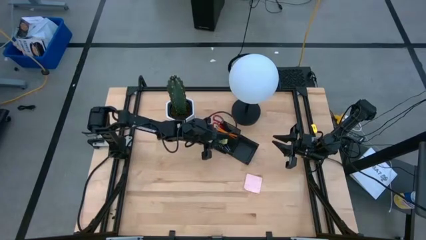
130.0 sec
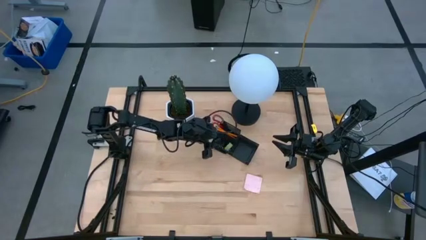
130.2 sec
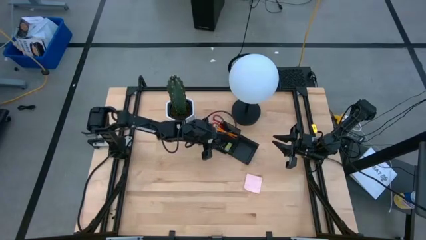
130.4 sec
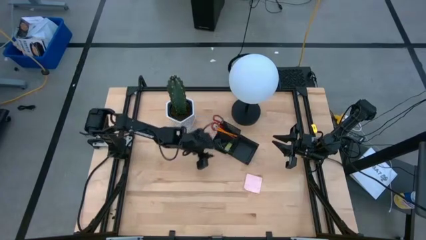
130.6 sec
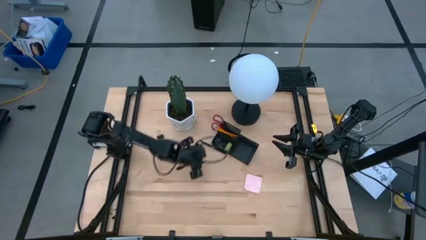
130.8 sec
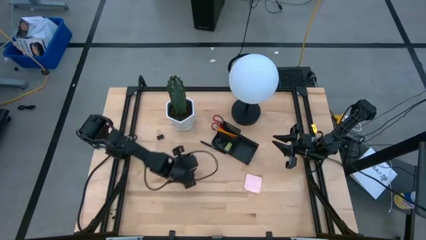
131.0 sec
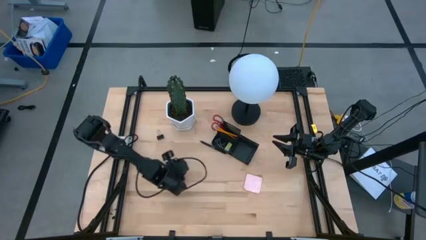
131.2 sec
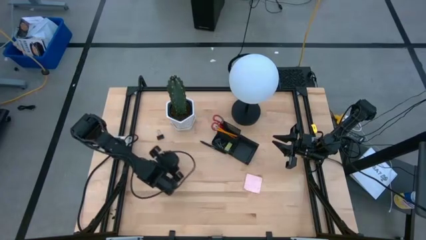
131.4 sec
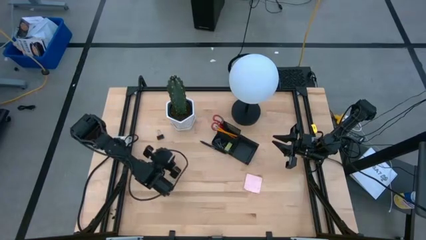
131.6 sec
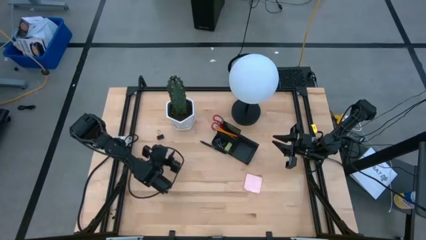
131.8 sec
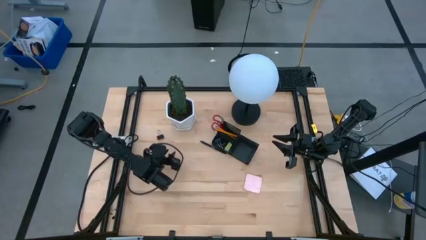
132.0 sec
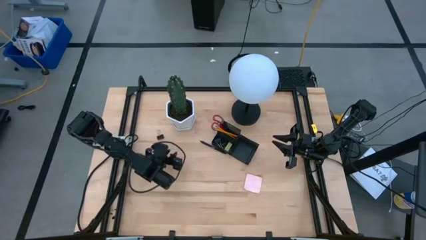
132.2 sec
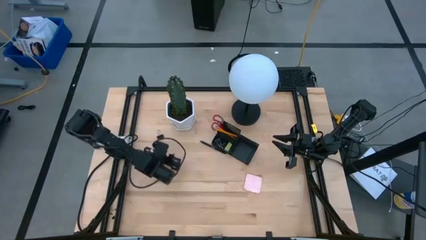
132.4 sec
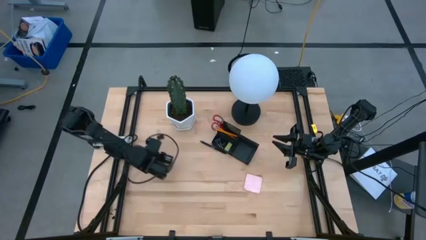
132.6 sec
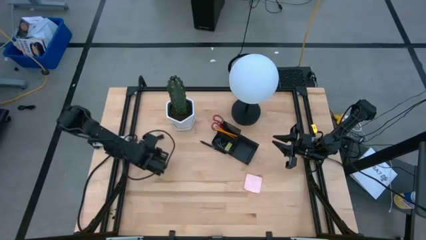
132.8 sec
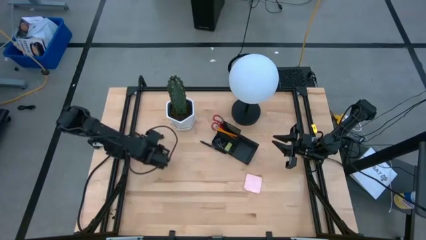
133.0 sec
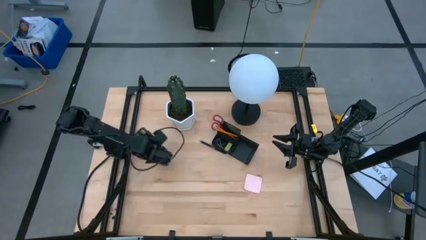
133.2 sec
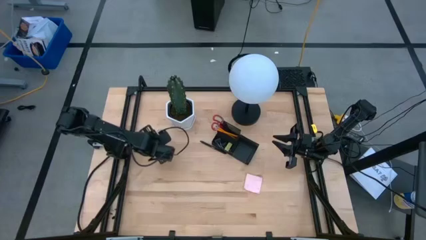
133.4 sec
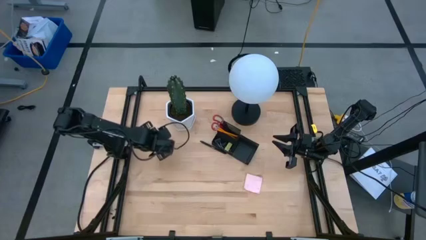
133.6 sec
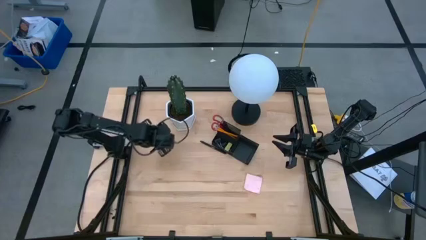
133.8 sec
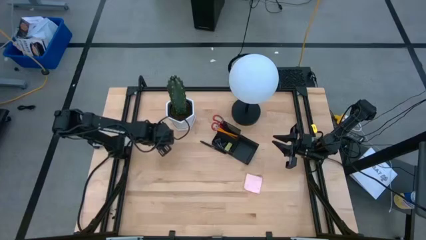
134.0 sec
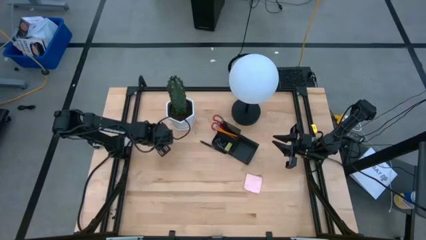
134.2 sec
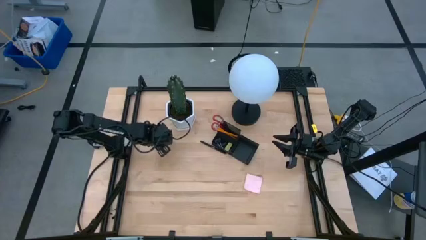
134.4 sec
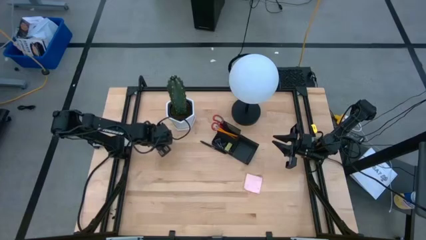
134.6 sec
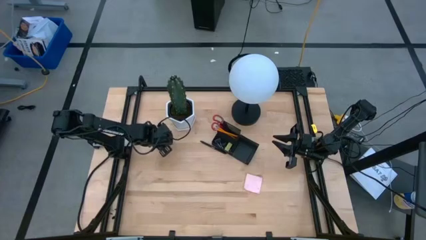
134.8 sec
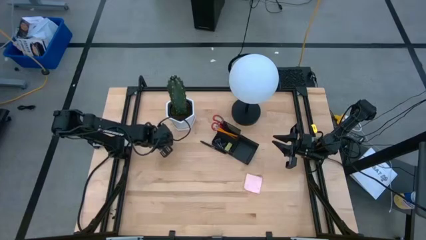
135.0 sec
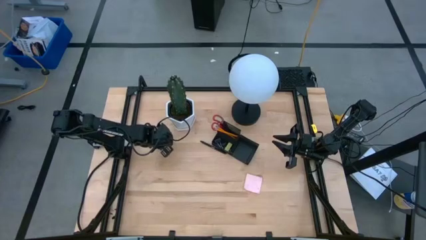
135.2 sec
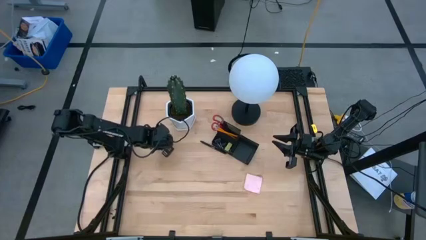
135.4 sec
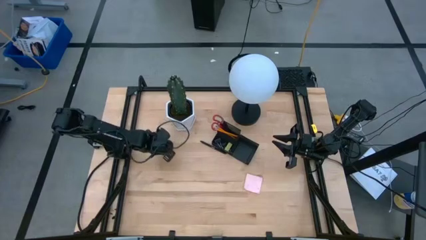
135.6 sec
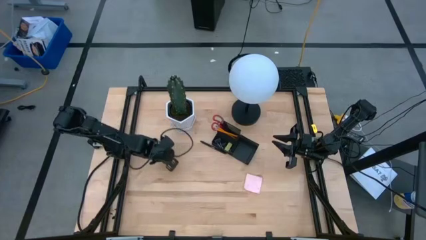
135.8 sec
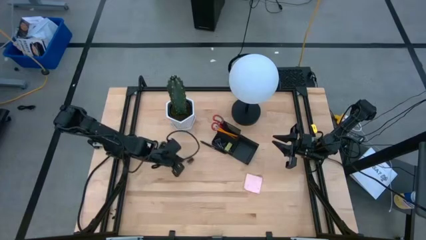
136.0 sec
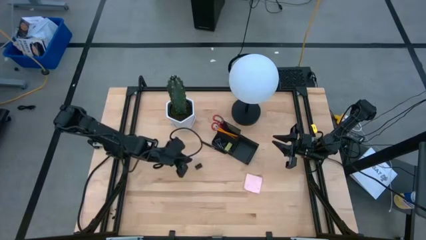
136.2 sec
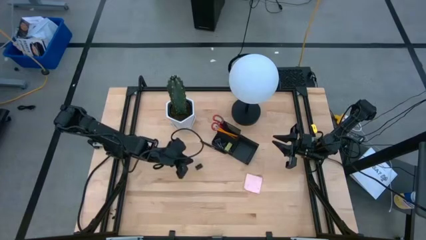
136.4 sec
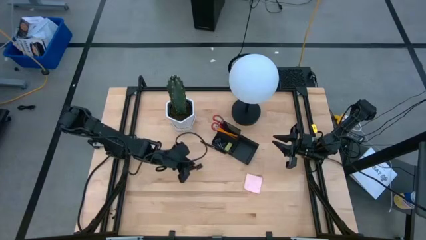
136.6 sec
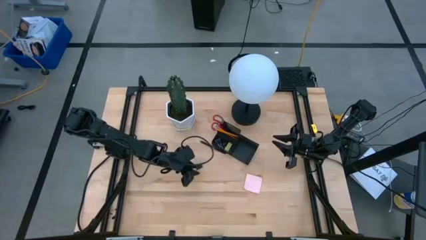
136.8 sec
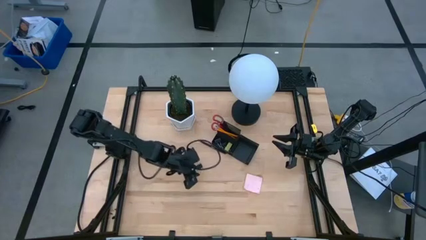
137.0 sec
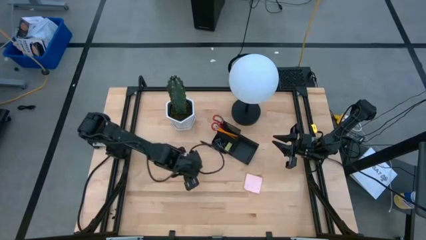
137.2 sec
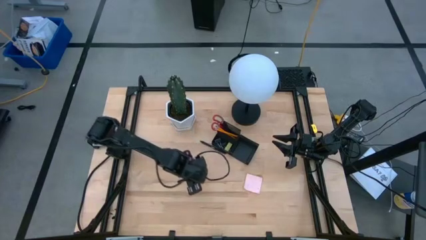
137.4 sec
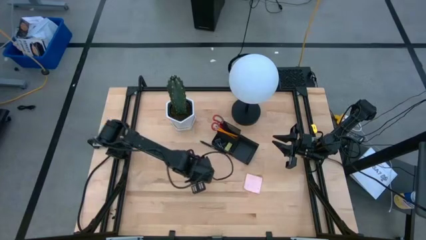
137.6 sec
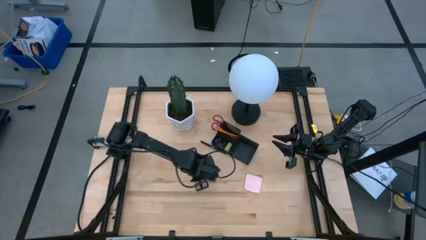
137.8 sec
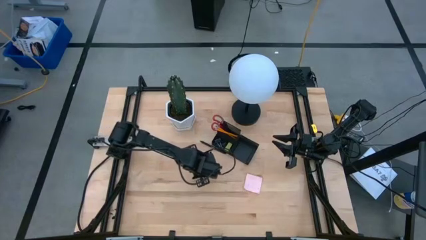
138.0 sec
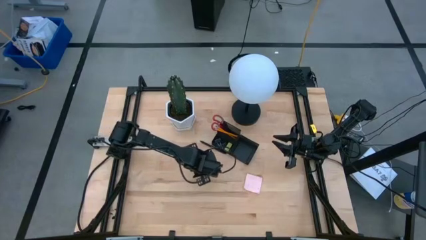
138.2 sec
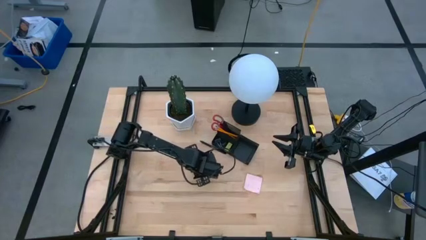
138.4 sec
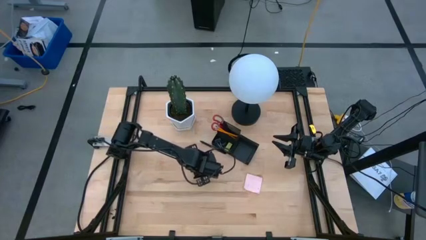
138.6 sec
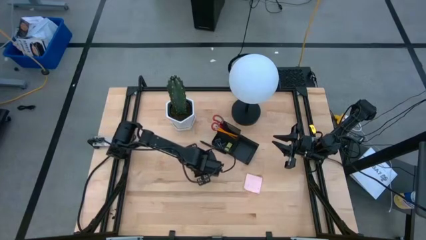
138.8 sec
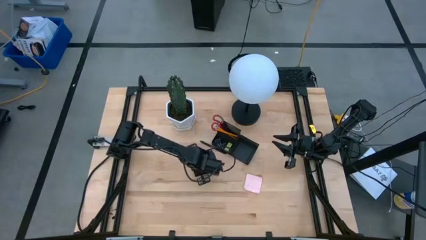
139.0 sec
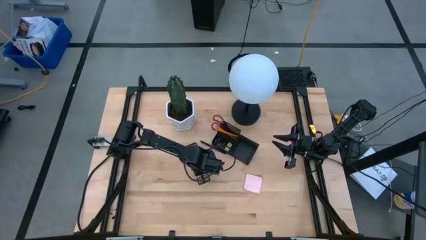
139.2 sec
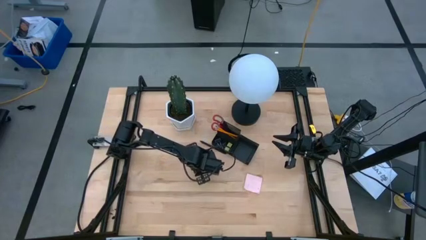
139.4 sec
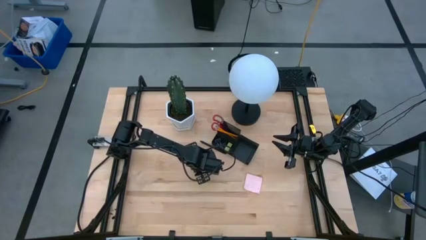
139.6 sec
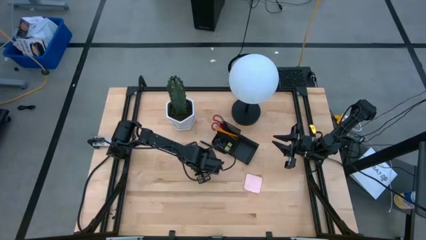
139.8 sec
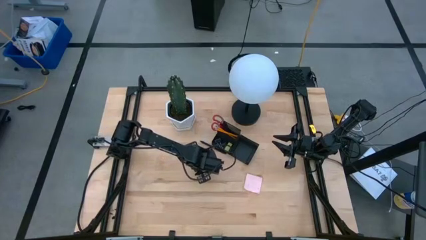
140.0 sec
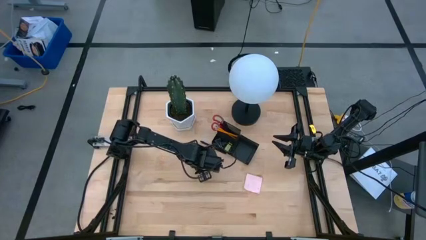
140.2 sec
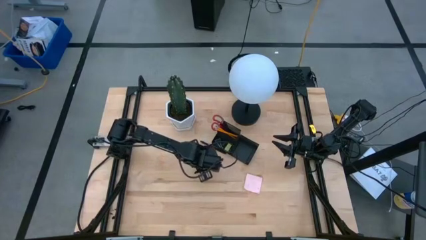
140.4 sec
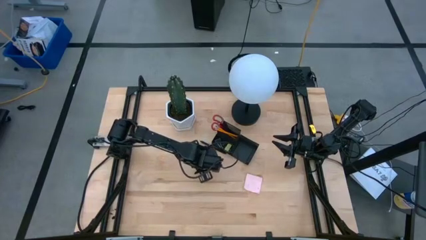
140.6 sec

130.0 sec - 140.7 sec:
Task: Pick and place office supplies into organizer
Put the black binder clip into the black desk organizer

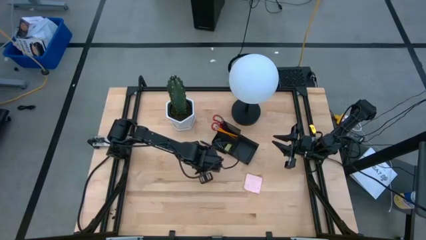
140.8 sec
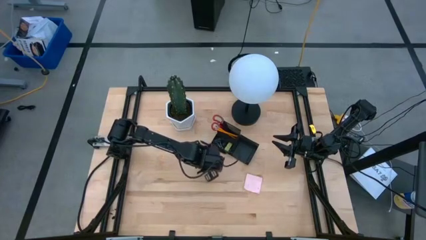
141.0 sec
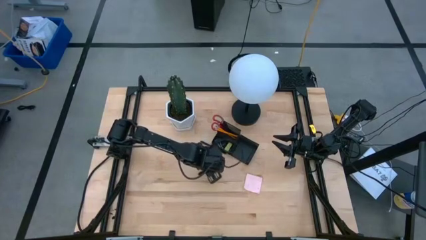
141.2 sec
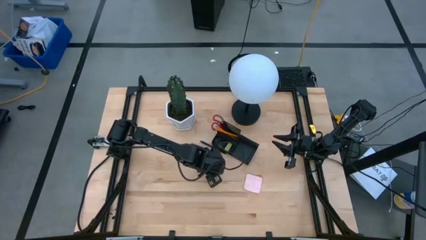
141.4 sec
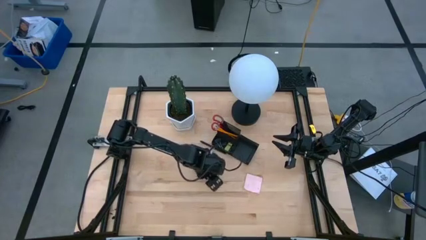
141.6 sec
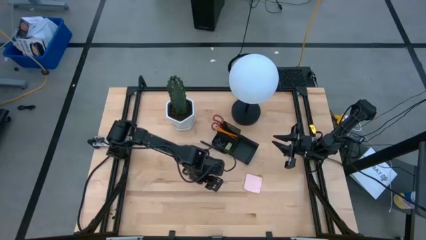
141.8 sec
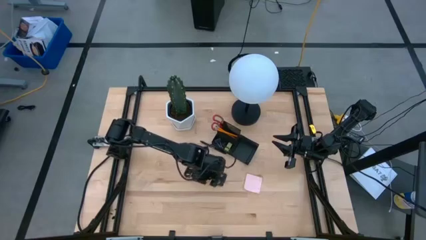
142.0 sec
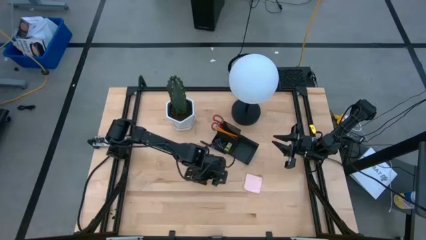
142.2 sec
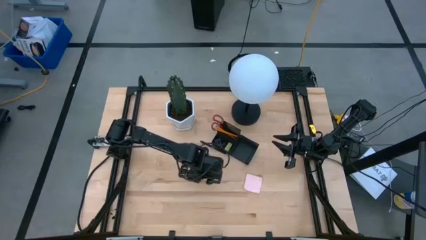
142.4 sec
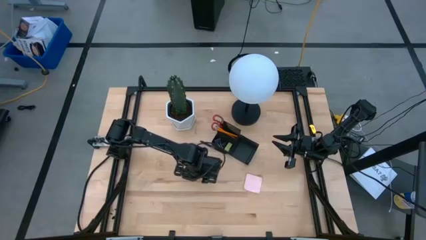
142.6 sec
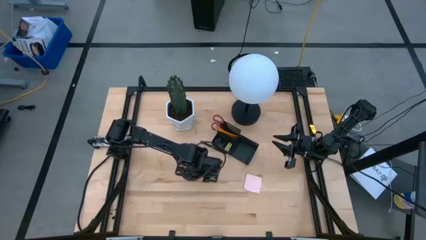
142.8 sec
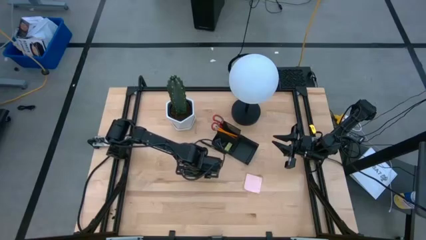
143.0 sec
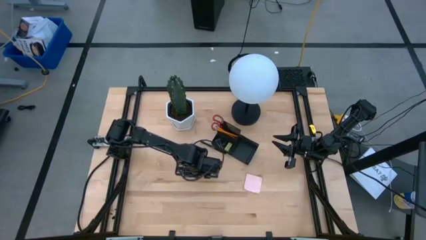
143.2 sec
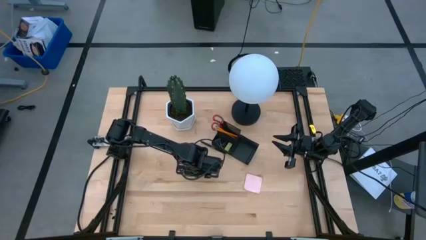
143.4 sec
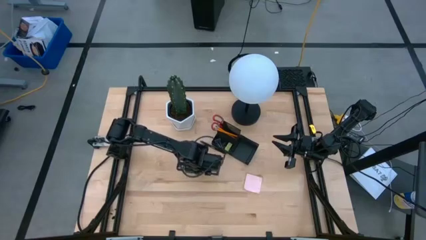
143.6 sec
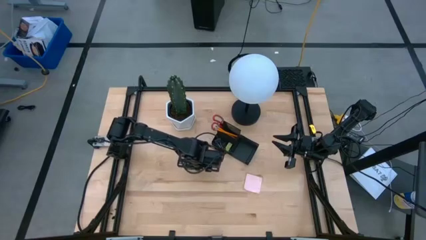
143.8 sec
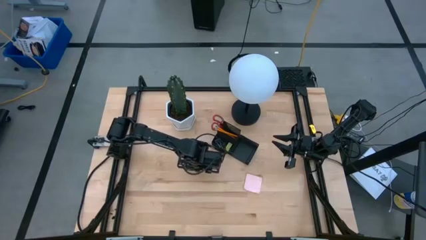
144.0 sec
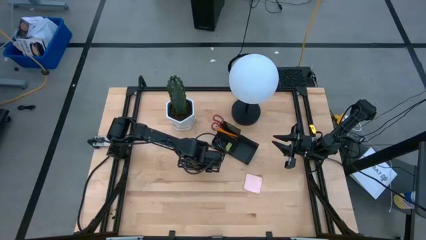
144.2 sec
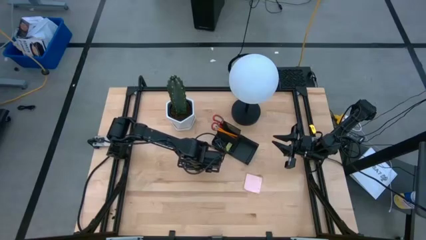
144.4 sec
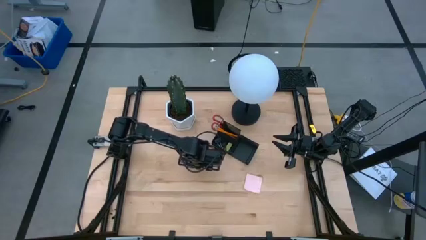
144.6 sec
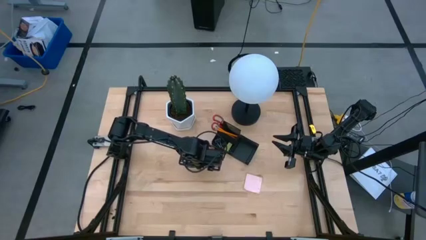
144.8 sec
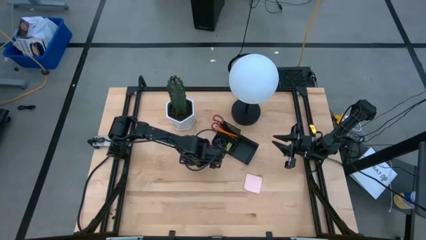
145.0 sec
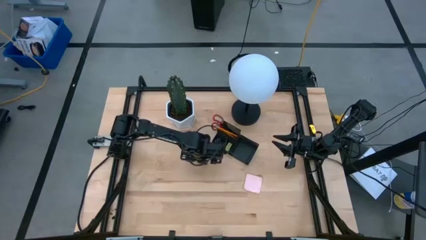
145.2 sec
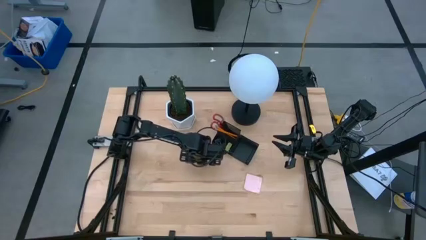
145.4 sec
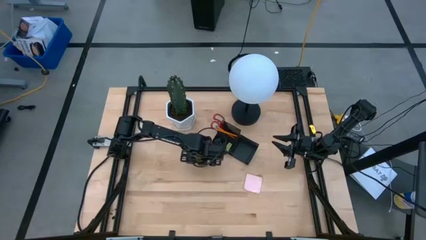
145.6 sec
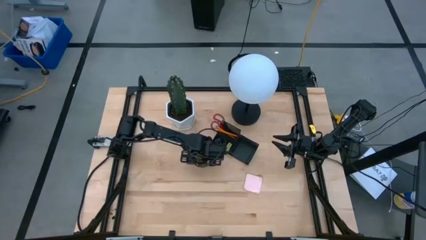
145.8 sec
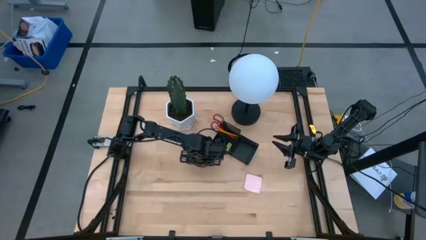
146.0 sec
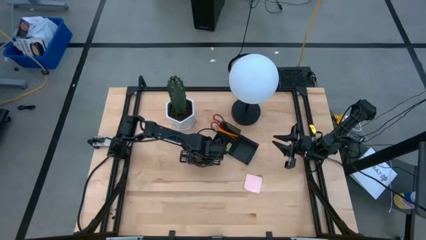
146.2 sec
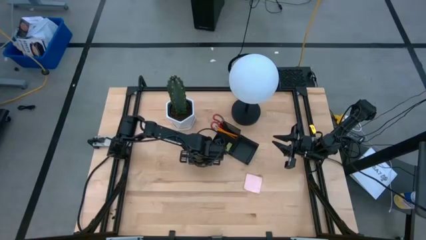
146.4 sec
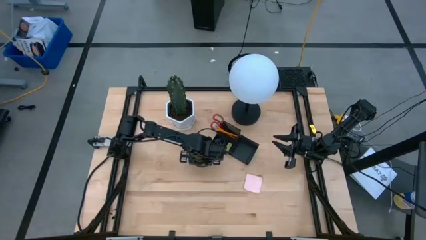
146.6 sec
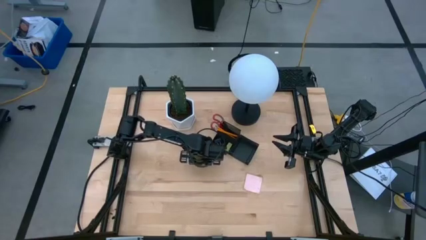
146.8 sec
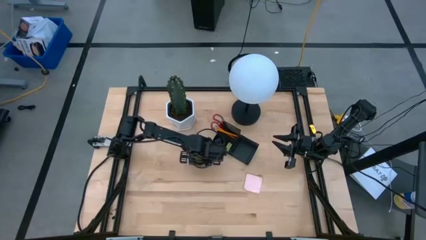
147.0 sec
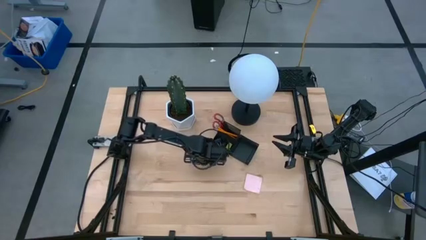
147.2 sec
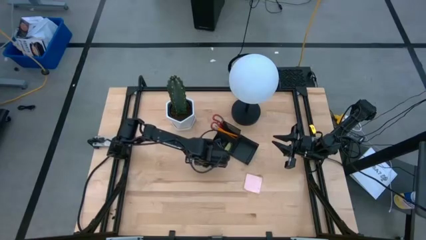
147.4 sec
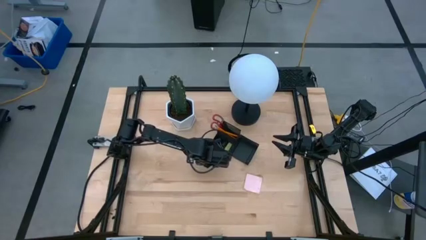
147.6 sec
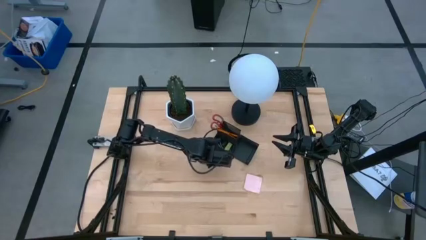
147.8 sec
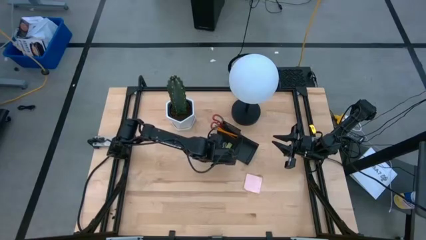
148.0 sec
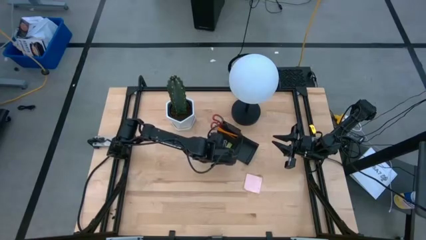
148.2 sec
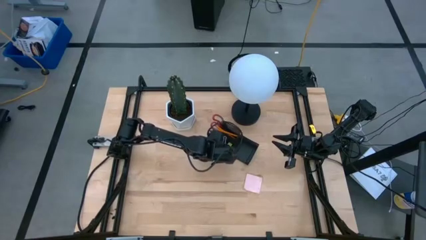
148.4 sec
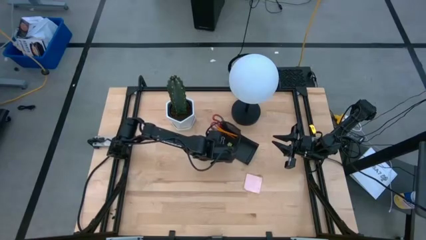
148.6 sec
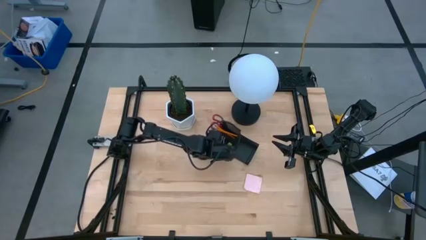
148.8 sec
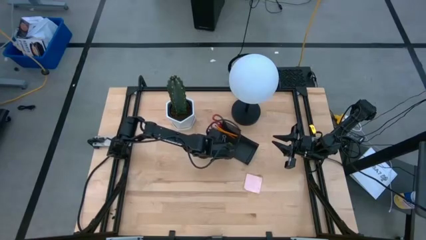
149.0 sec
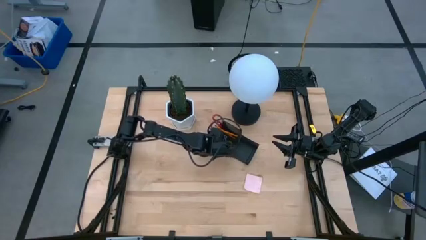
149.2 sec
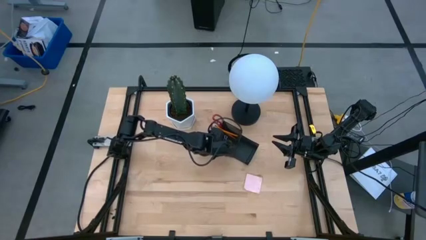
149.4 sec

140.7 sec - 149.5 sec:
Put the black binder clip into the black desk organizer
